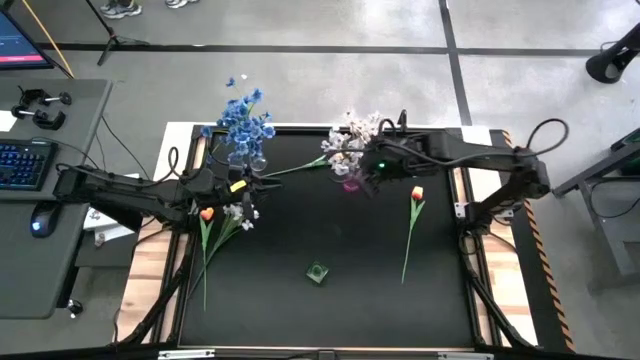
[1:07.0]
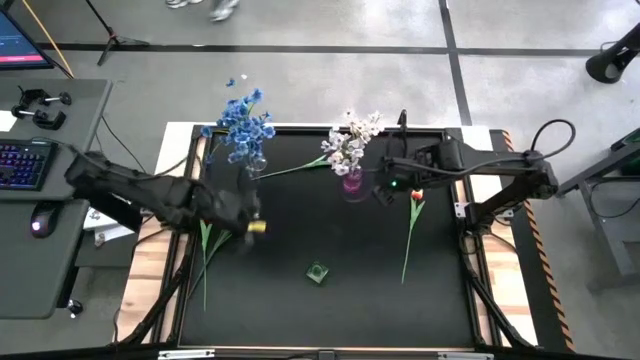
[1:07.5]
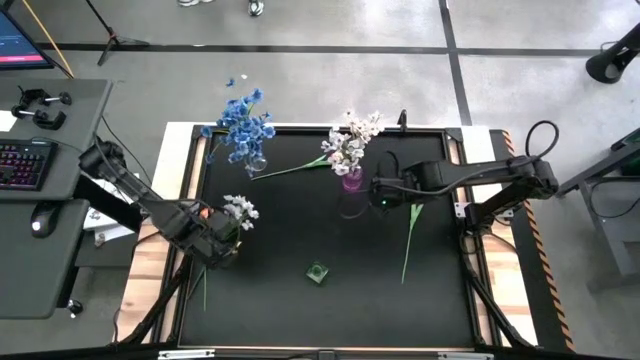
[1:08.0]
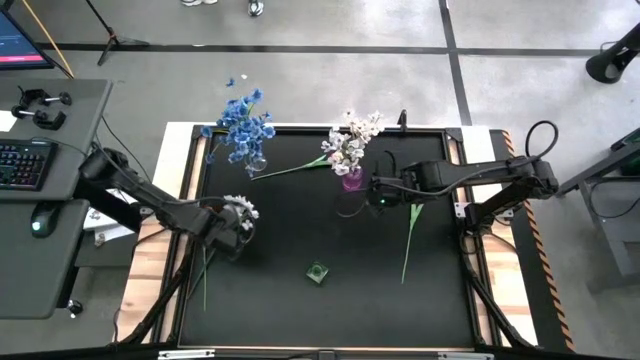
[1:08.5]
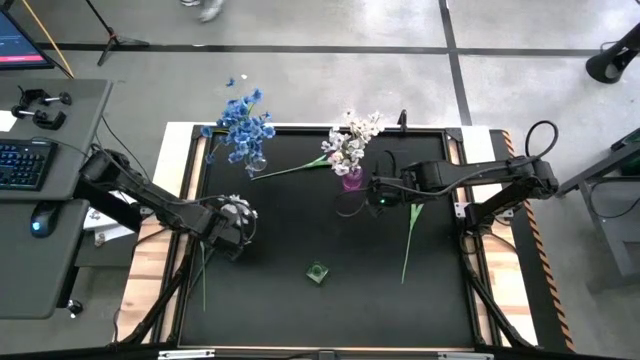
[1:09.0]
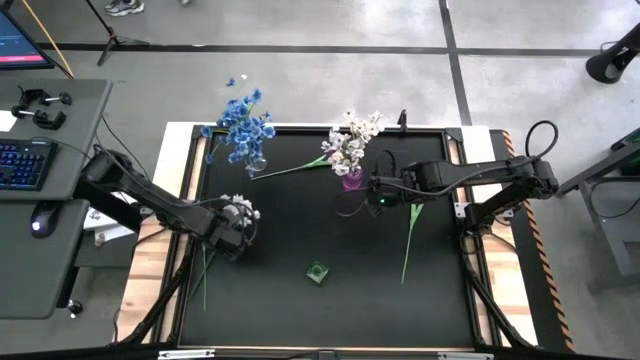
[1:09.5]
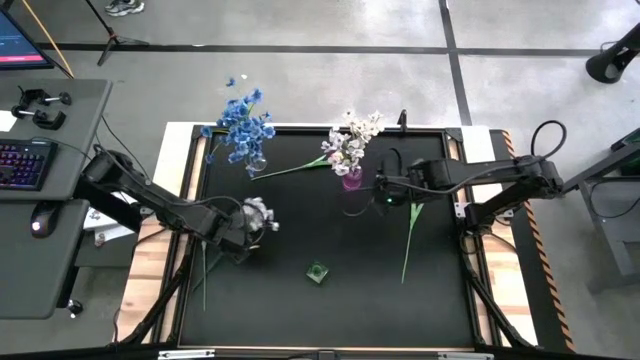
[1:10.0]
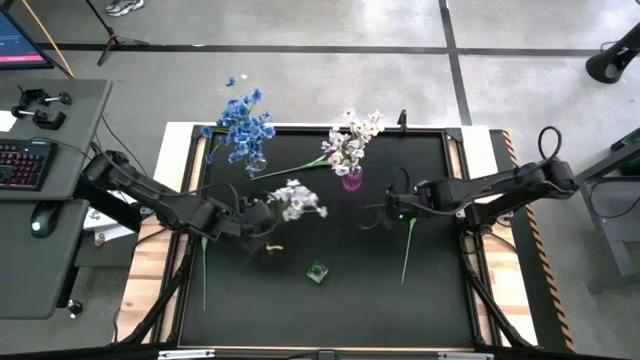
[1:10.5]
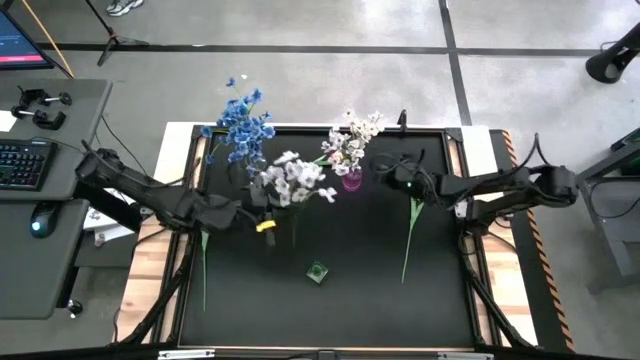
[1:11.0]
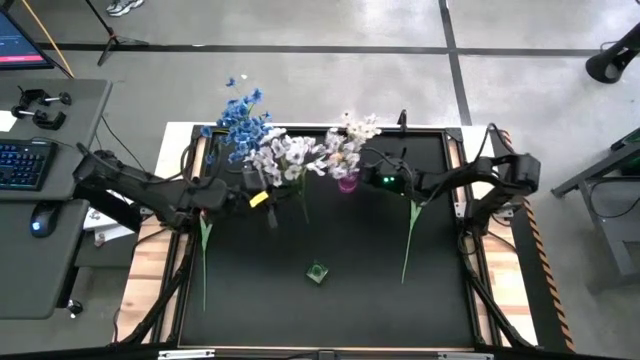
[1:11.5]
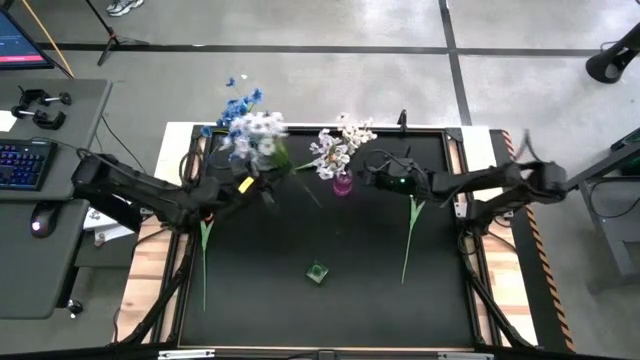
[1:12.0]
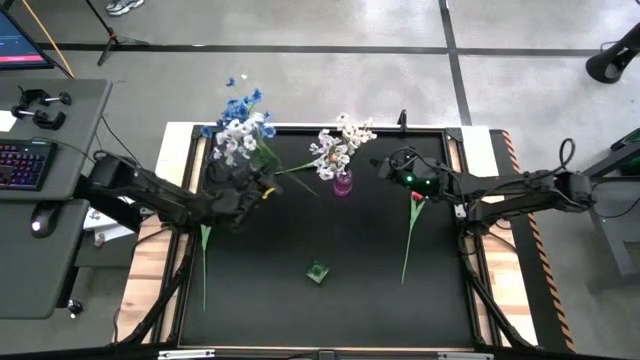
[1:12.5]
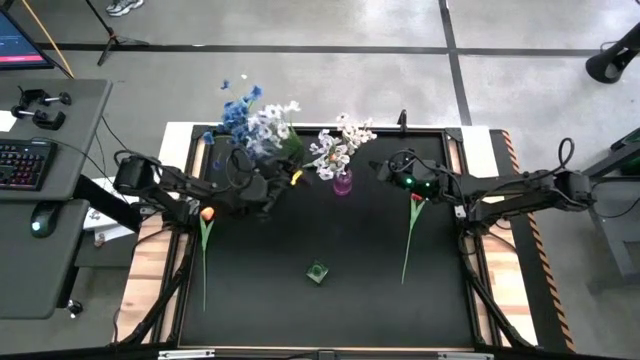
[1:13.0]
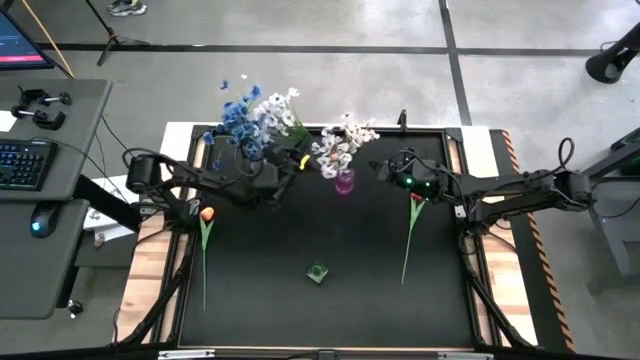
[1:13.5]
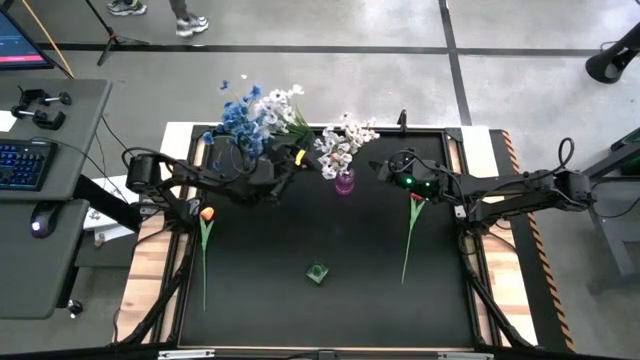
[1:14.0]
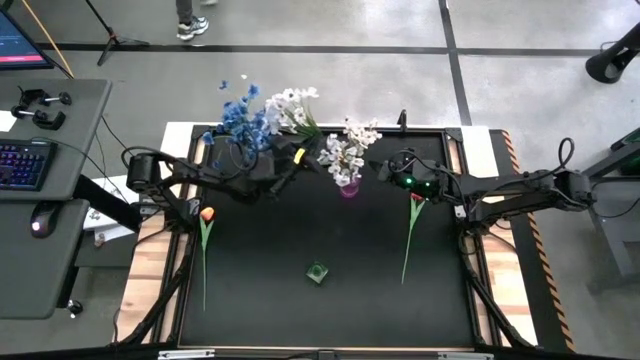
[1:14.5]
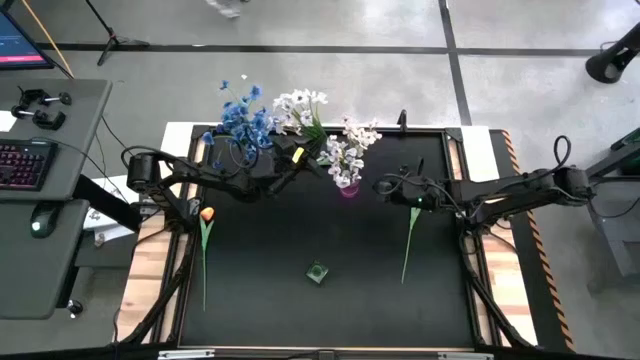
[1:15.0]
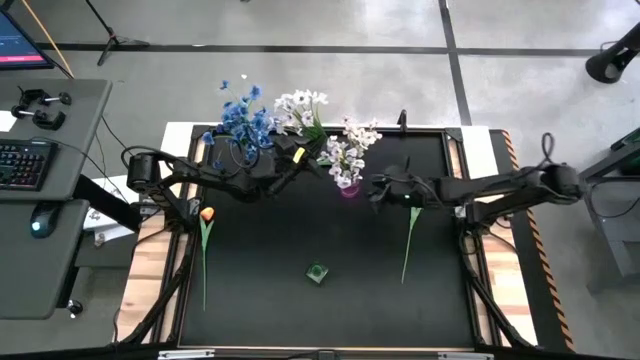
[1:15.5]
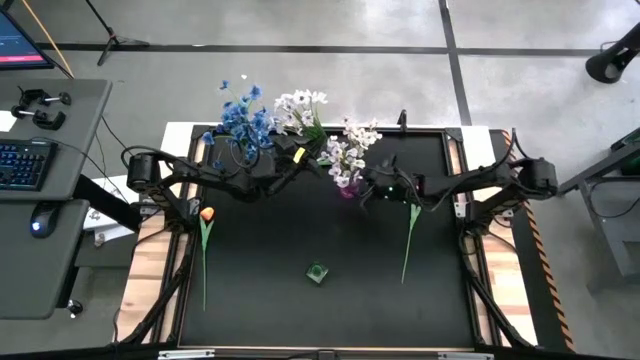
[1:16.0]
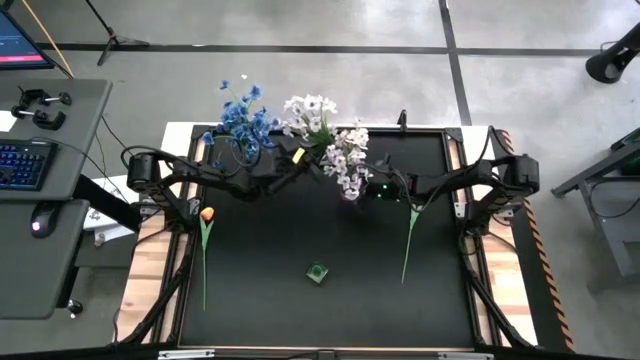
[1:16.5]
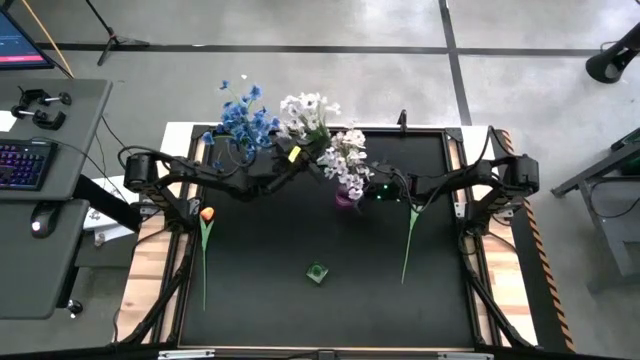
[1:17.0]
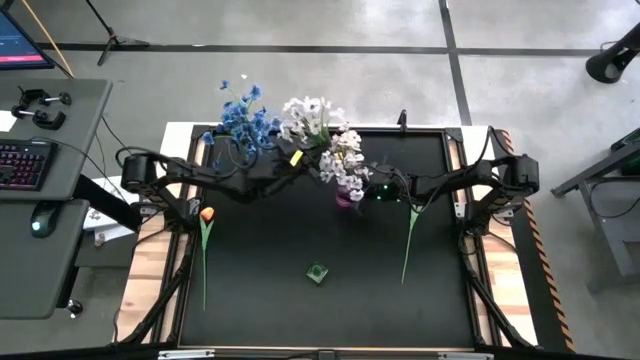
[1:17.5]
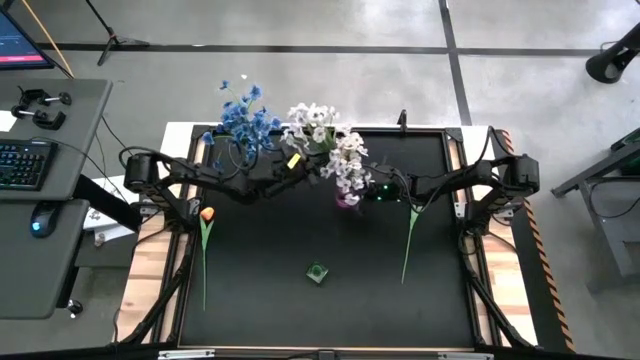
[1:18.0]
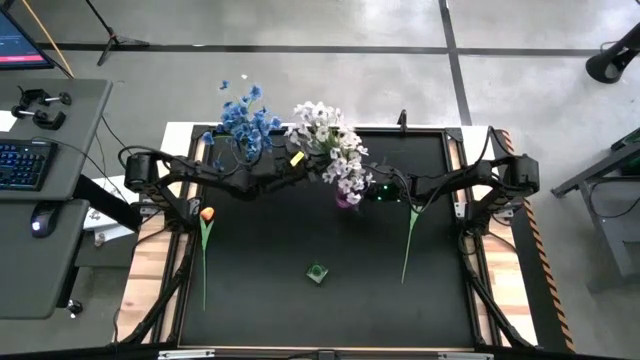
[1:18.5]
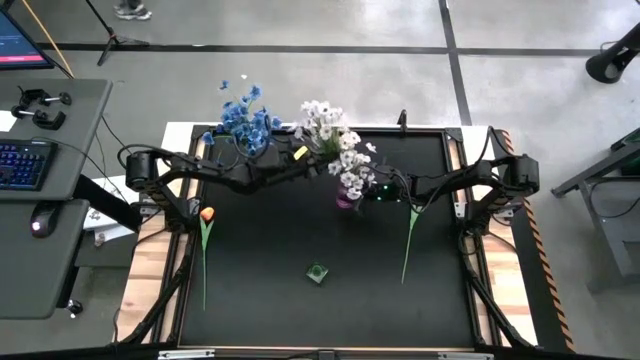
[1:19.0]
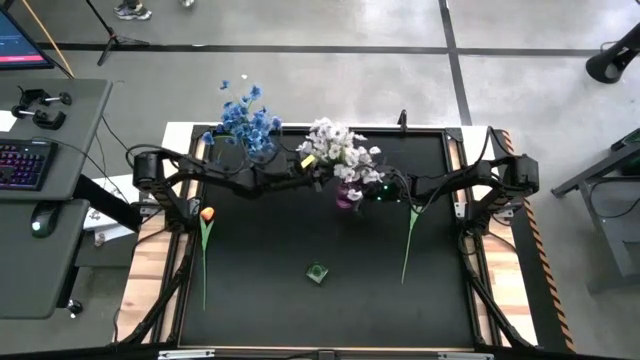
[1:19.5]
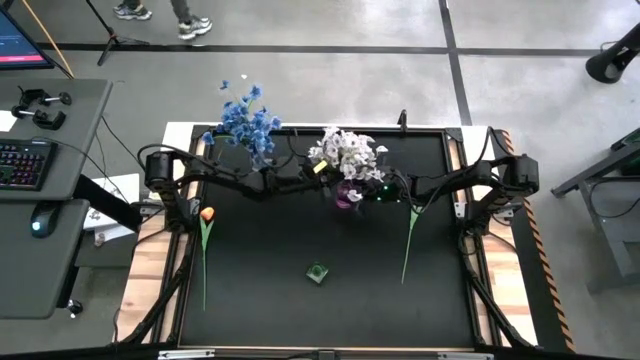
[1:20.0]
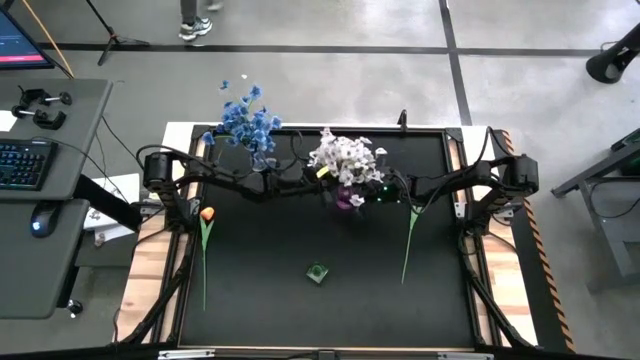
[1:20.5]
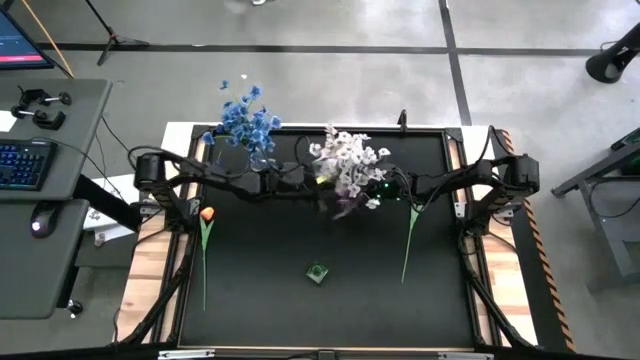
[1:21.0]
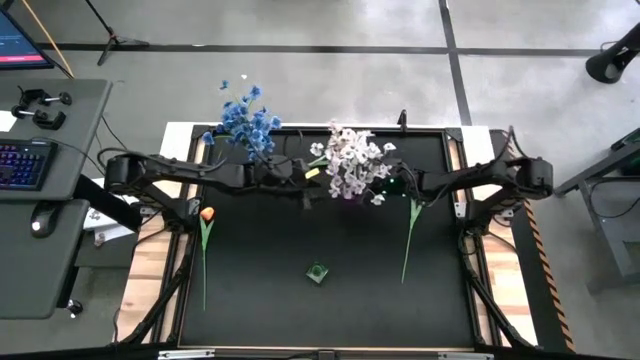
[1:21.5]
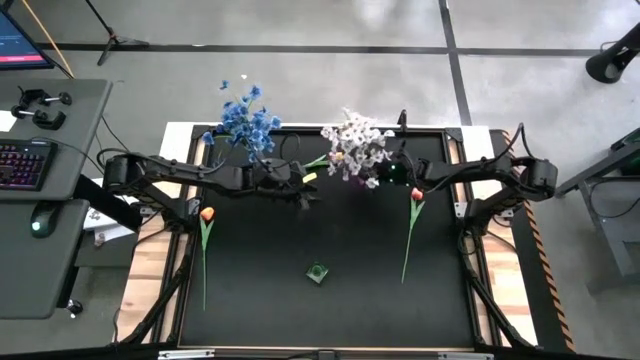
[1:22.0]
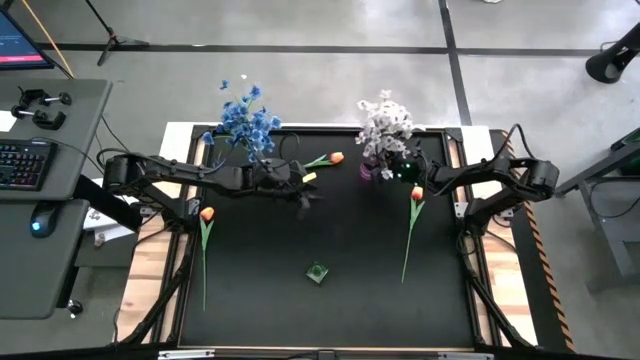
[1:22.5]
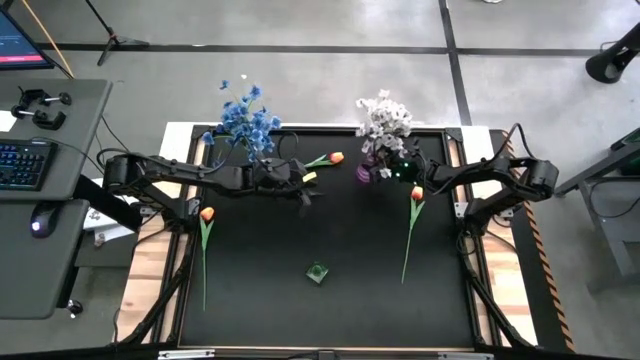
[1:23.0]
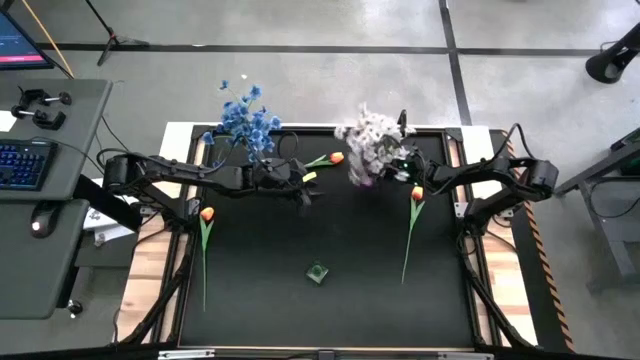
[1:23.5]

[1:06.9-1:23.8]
Task: Sort flowers into vase by color
Put the white flowers into the pink vase

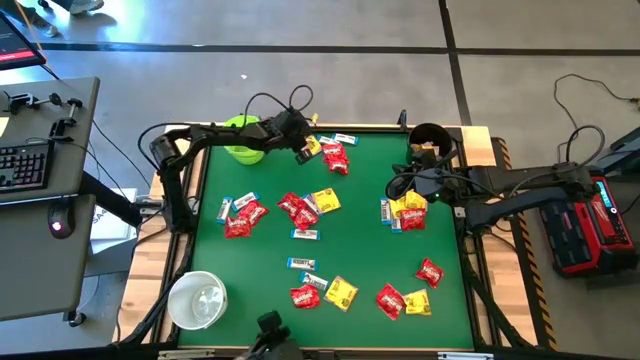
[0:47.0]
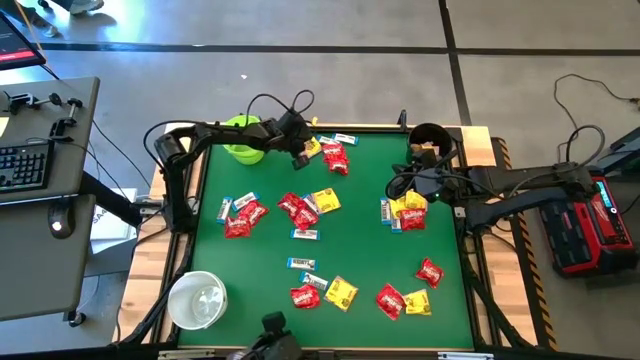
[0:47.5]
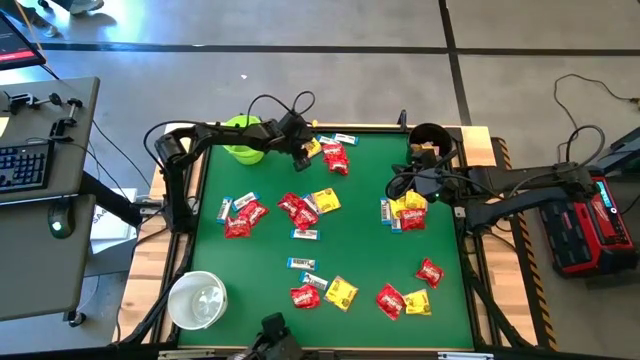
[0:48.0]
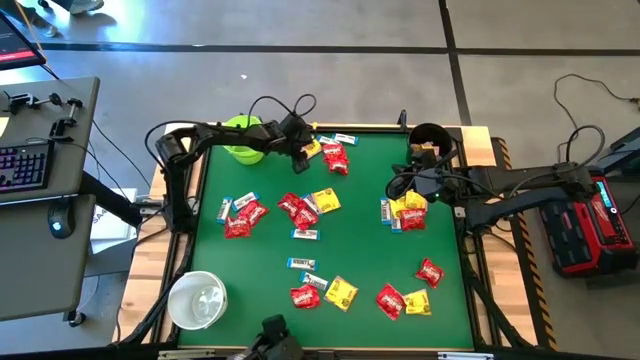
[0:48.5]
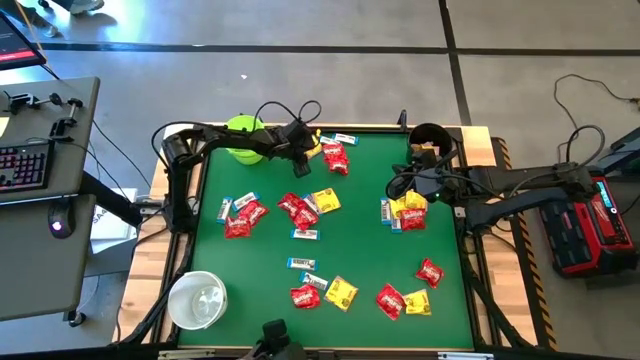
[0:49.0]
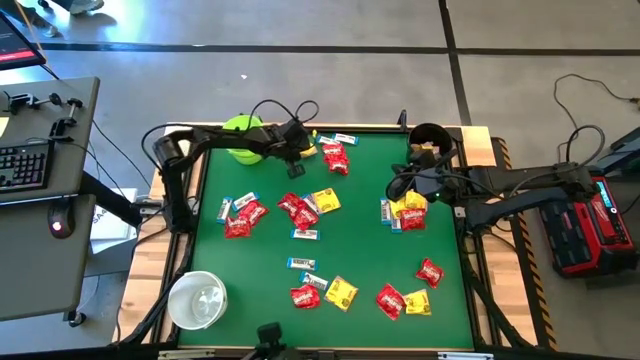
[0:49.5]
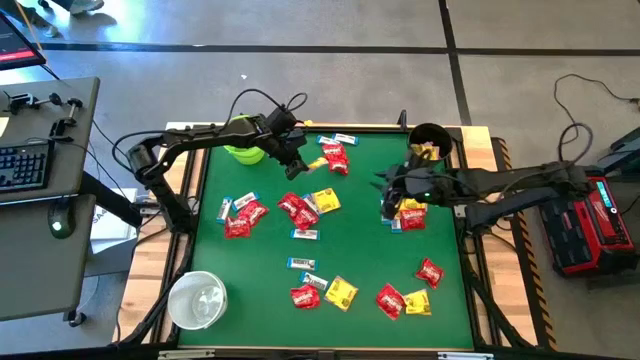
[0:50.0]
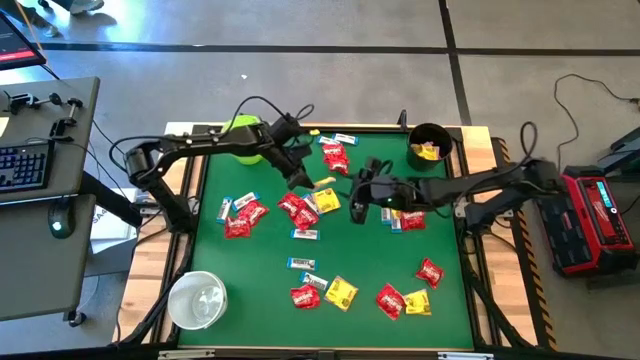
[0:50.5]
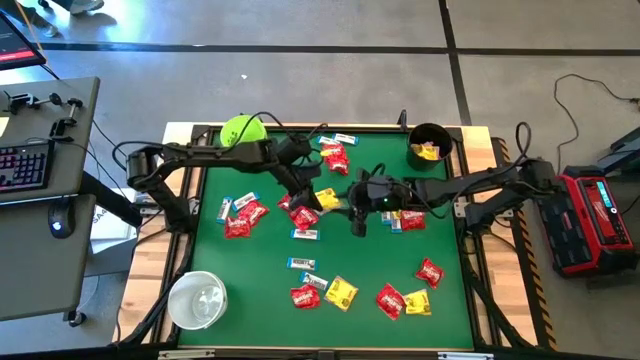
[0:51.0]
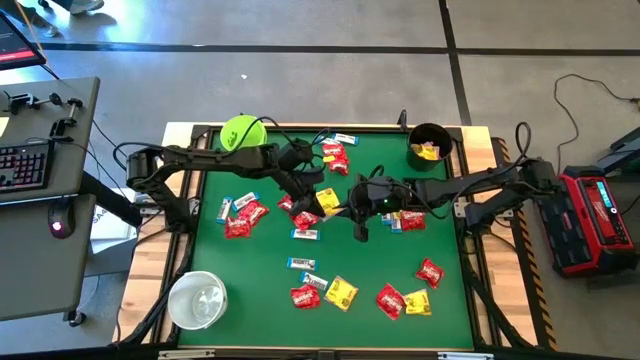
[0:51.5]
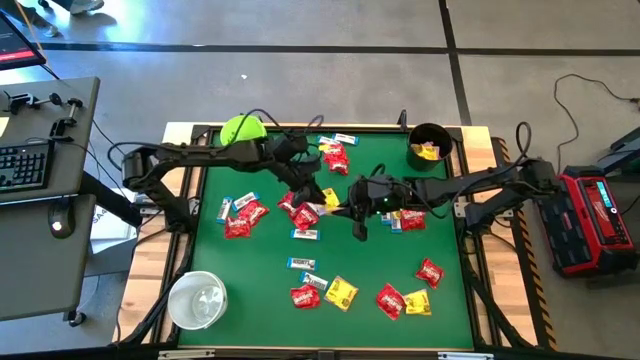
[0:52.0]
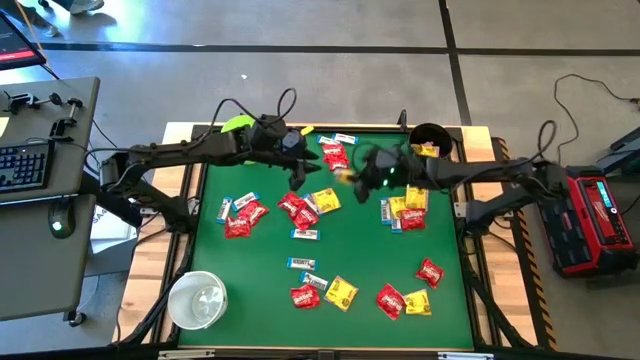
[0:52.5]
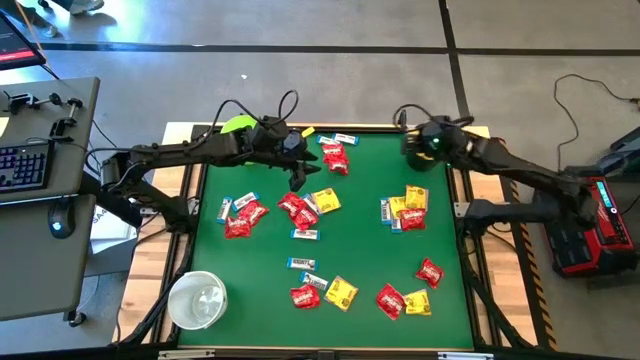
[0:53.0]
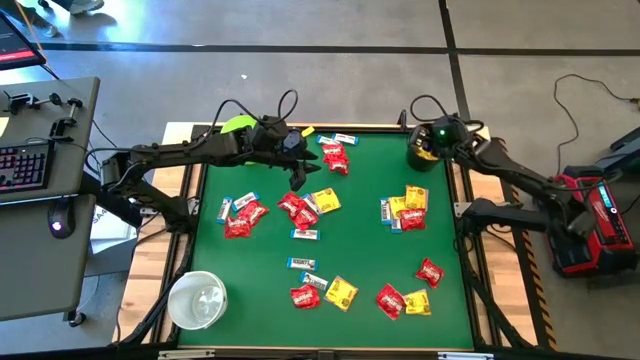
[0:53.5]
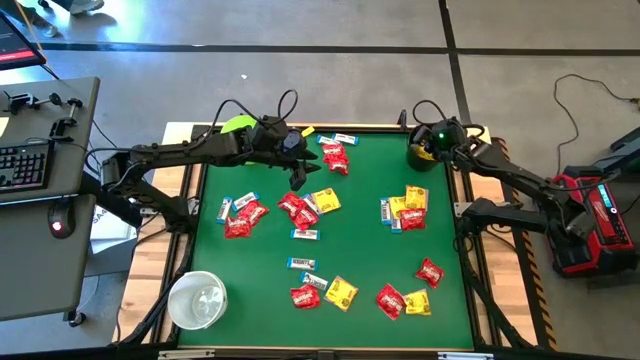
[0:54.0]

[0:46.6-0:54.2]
Task: Sort candy by brand, put in halloween buckets
Put the yellow candy into the black bucket
